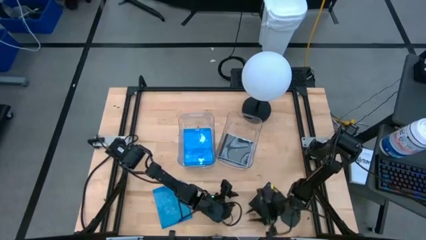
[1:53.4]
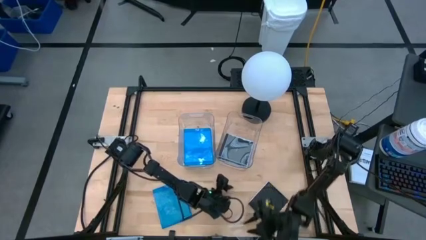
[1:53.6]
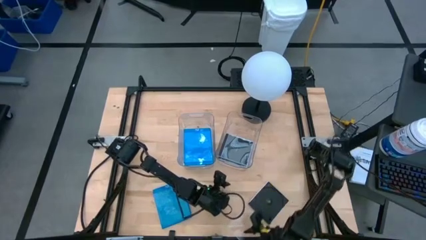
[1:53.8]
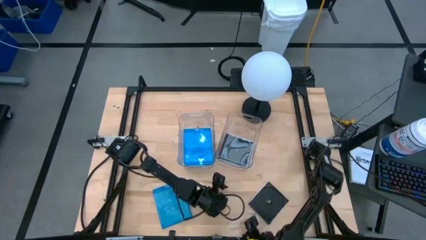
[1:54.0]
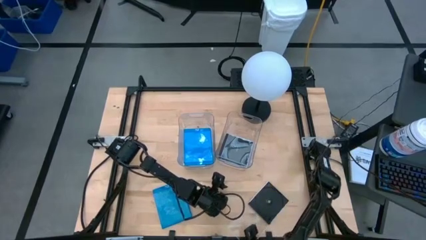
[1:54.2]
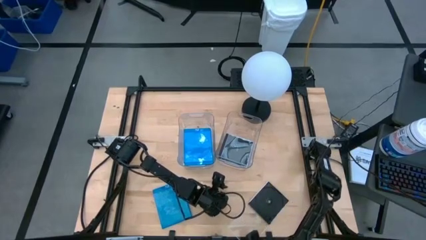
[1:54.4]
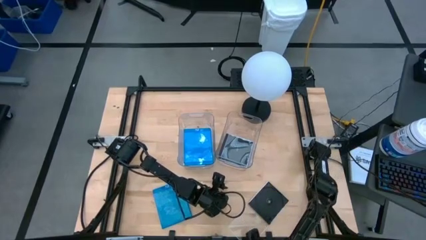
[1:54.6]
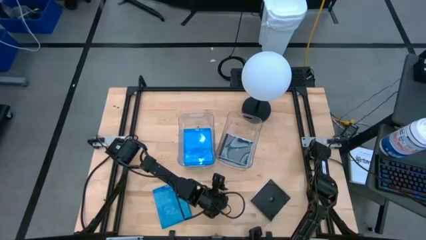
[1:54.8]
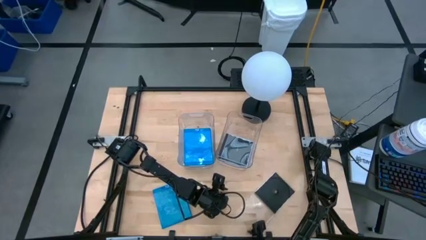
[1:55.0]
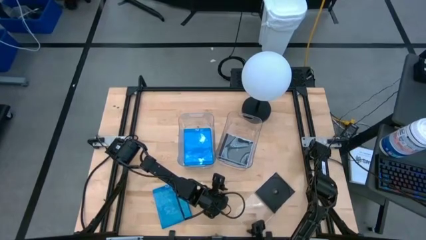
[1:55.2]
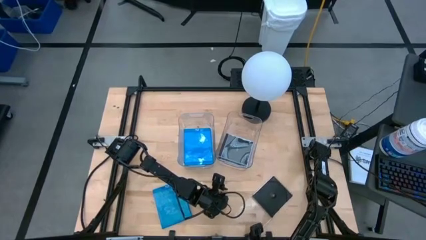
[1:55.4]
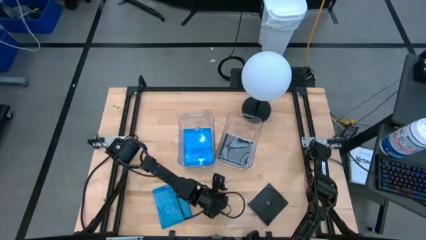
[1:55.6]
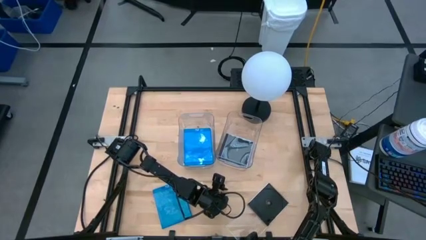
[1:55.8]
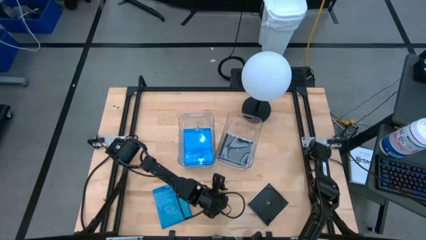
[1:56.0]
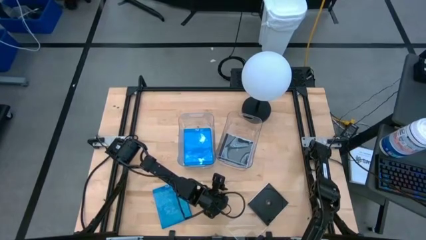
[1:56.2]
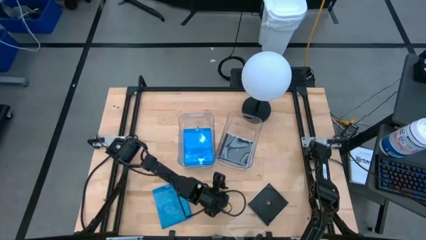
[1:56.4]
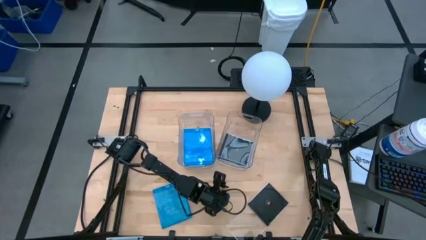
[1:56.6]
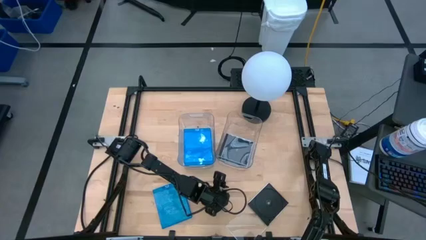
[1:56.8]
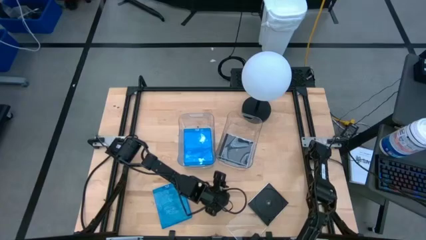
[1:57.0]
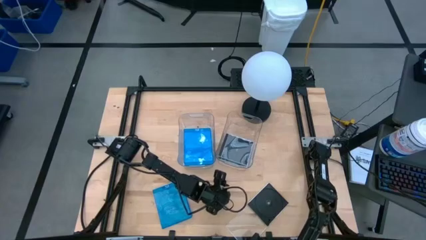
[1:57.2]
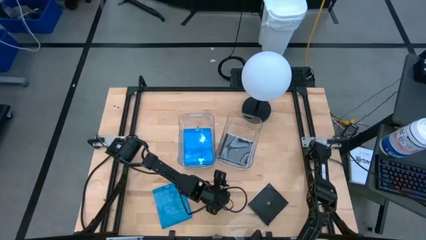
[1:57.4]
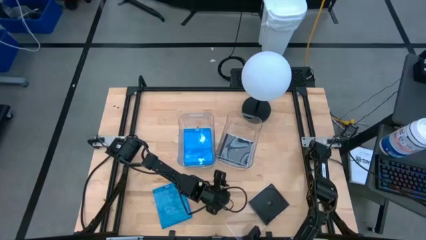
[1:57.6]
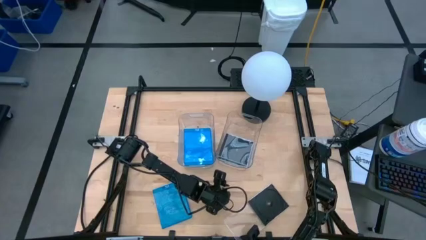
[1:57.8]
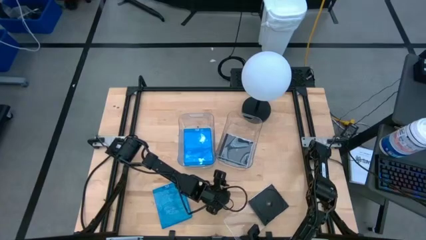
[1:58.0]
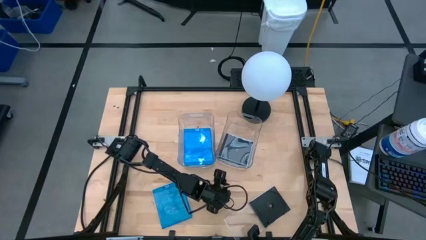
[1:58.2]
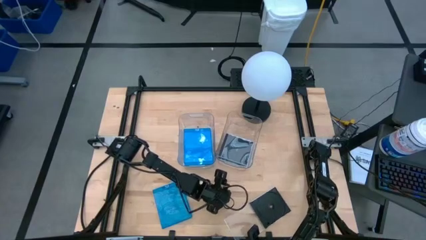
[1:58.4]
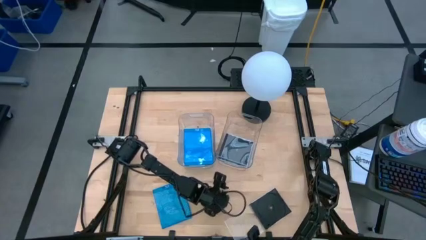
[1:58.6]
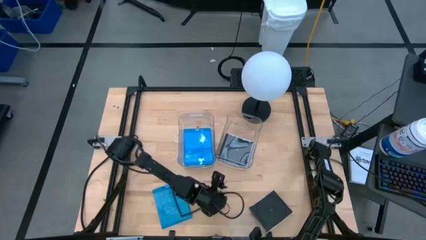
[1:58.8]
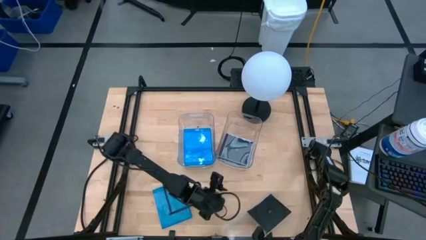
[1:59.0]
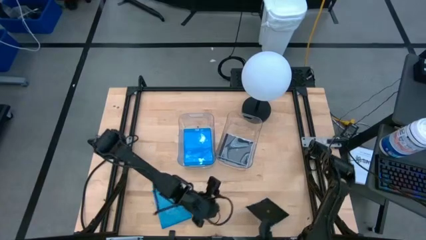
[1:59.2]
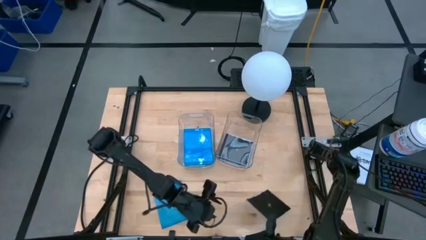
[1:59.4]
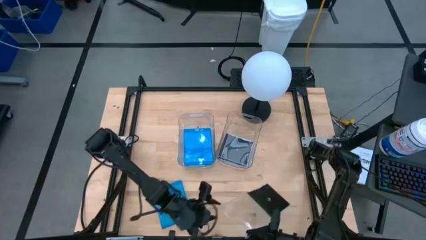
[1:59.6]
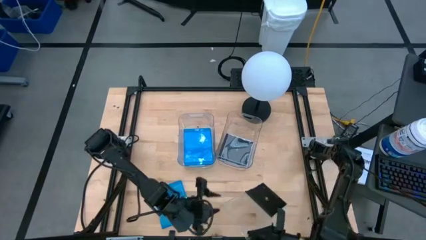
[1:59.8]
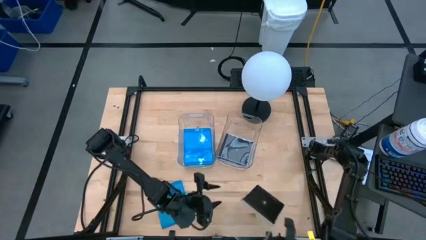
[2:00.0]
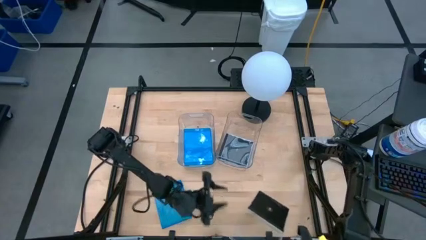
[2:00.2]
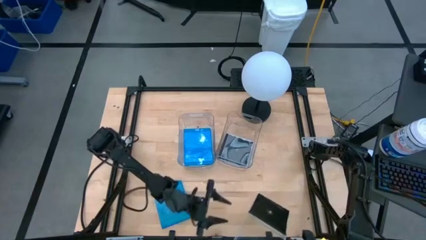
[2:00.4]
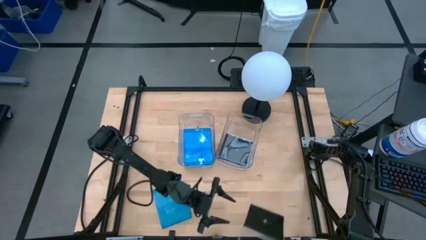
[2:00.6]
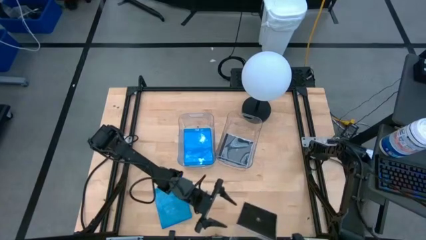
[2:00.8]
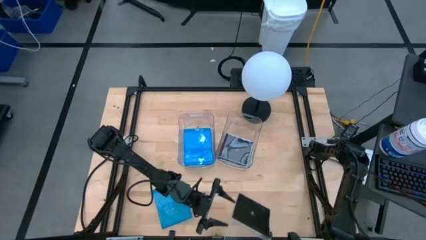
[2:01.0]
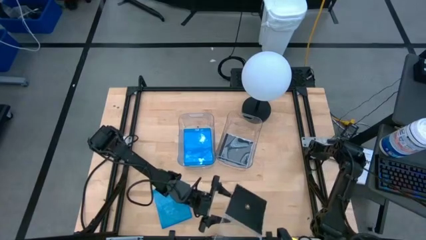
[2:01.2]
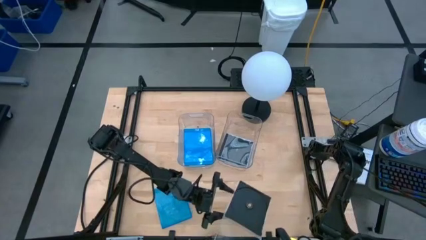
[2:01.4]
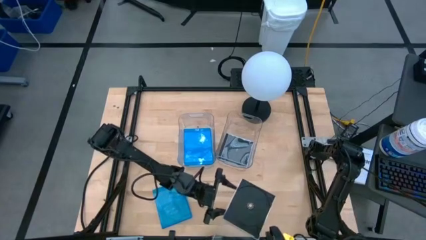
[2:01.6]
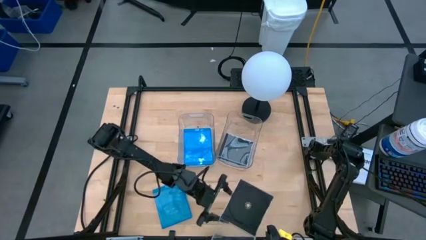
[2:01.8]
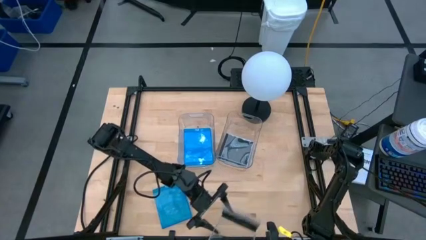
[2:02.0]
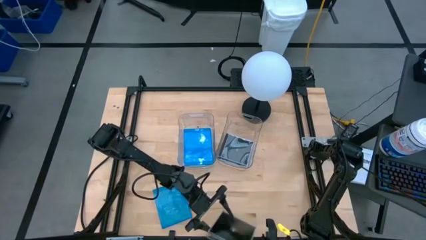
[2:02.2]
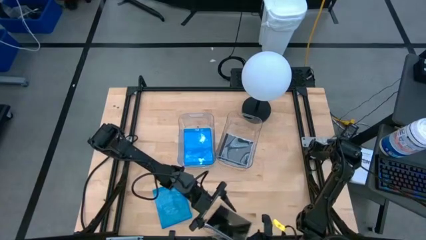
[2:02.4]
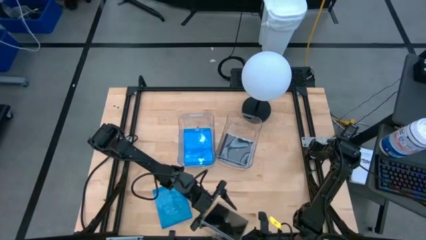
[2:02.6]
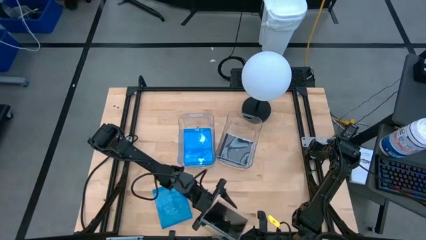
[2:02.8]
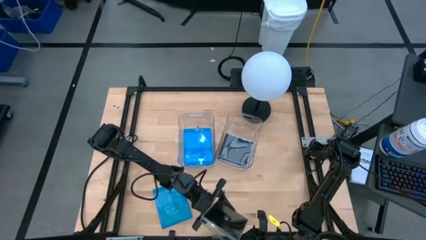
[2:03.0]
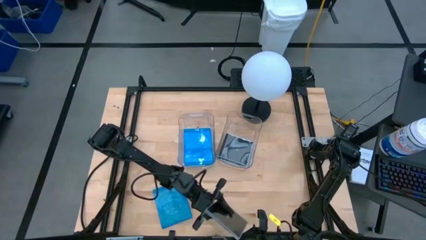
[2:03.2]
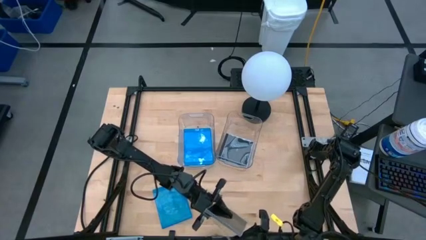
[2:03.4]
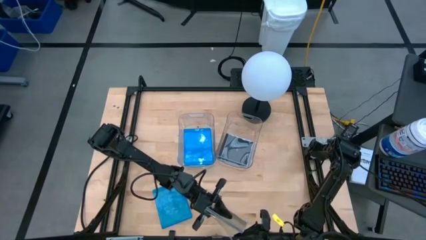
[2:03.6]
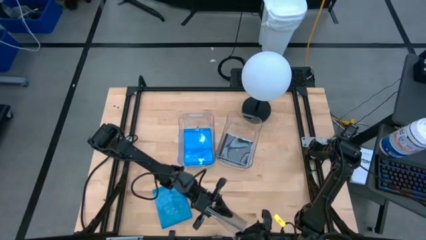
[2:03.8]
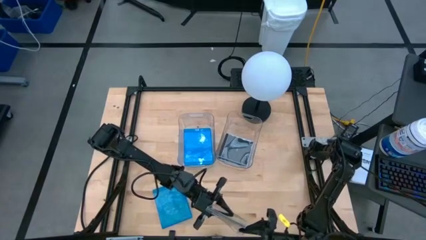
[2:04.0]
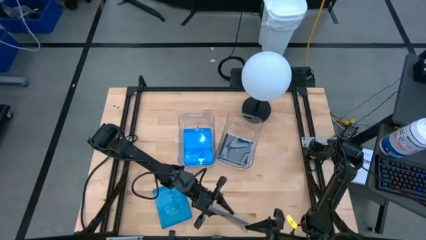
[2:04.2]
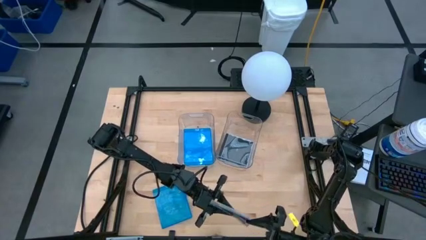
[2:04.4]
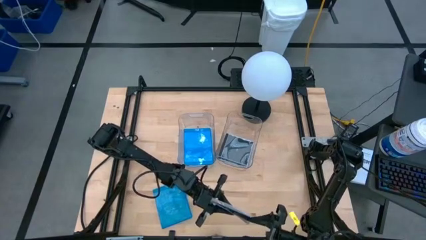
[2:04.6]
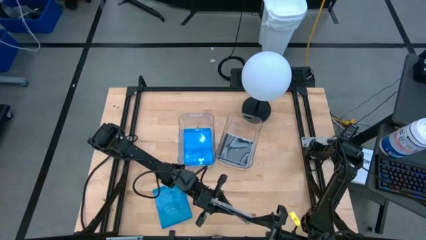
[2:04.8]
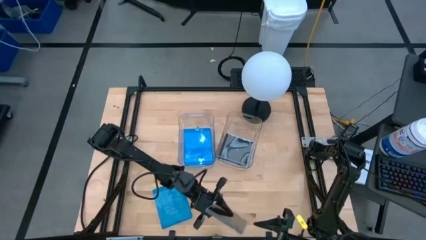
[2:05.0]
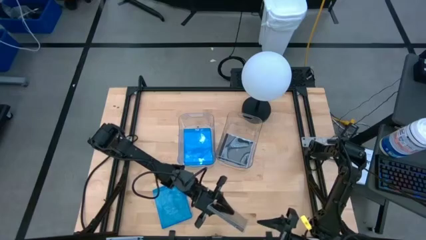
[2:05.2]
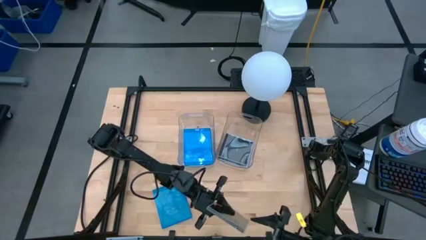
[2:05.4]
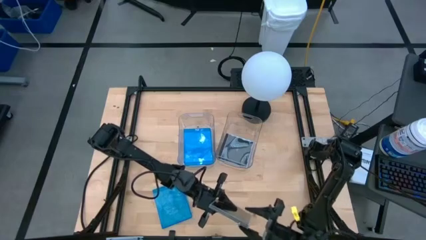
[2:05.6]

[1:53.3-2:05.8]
Task: Pick & place jewel cases by type
Put the black cd case into the right transparent bin

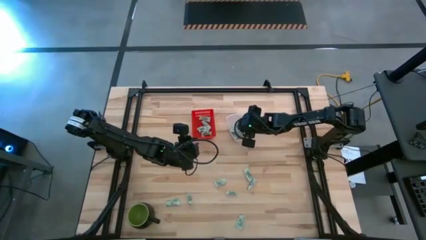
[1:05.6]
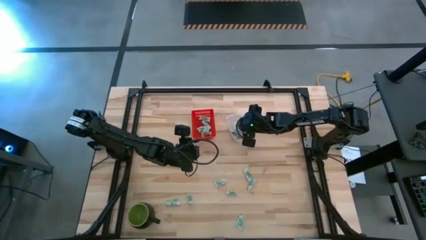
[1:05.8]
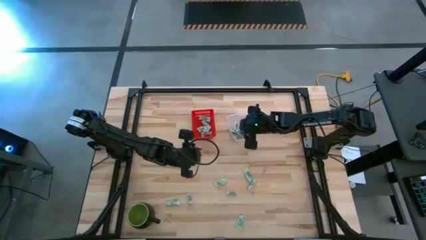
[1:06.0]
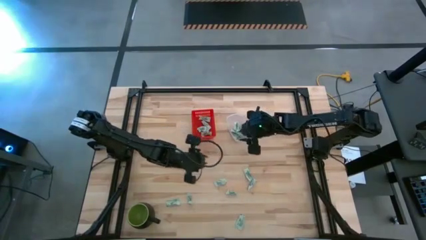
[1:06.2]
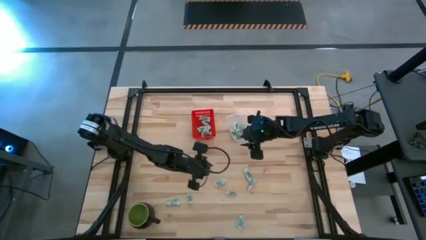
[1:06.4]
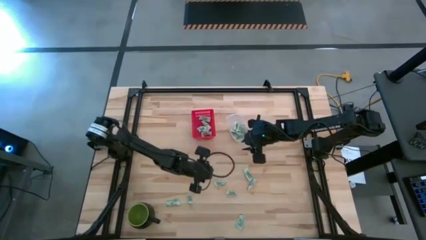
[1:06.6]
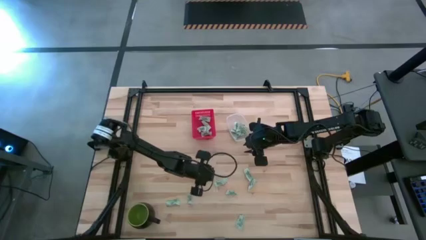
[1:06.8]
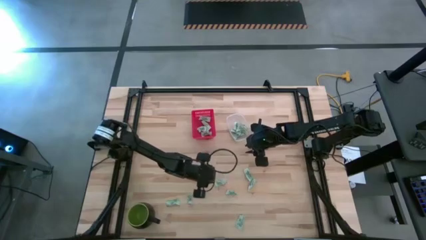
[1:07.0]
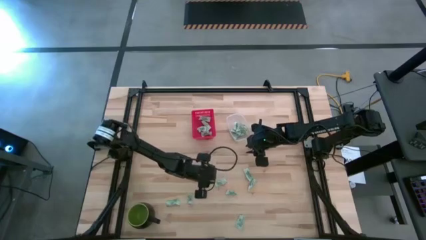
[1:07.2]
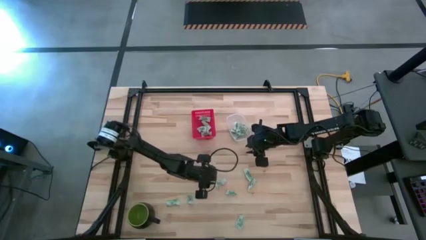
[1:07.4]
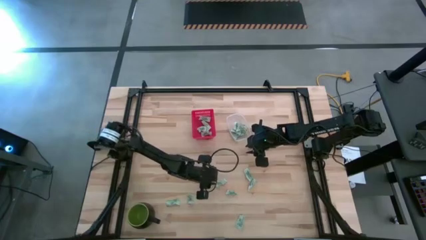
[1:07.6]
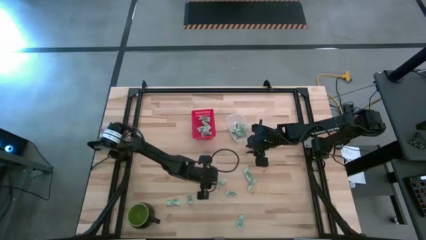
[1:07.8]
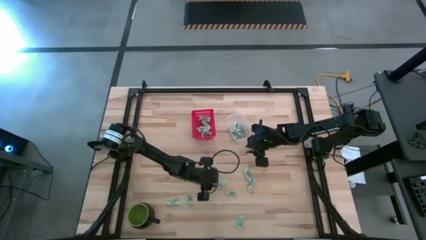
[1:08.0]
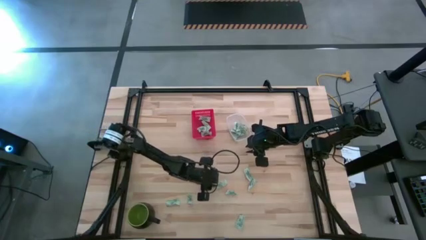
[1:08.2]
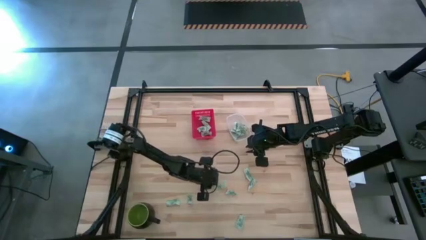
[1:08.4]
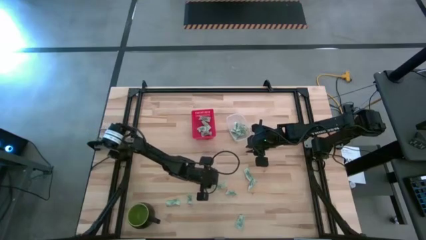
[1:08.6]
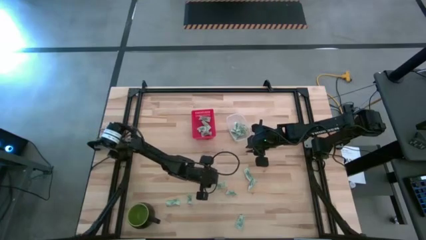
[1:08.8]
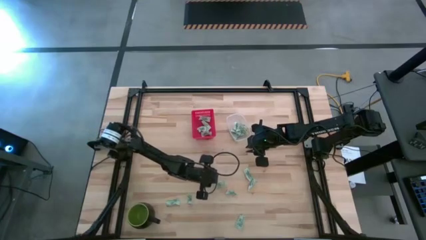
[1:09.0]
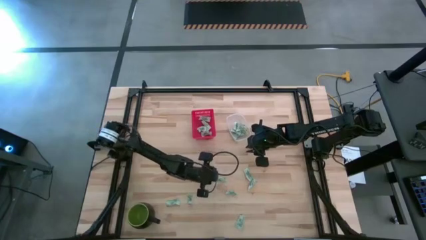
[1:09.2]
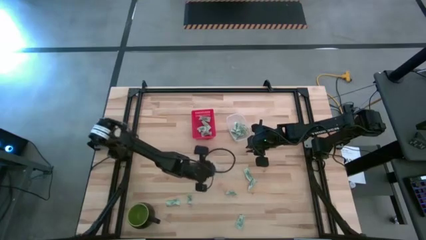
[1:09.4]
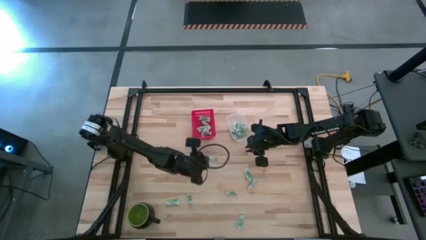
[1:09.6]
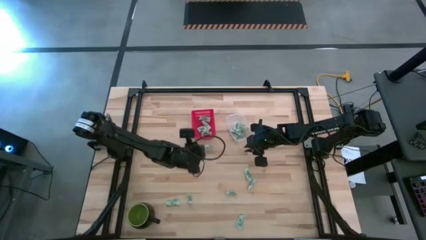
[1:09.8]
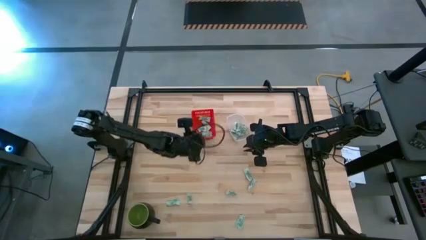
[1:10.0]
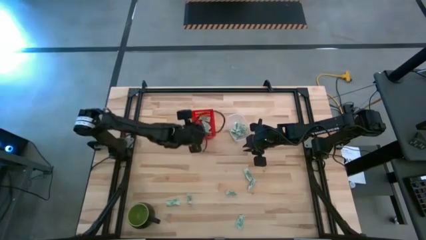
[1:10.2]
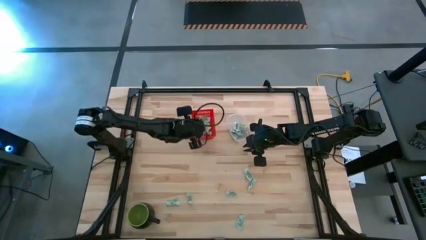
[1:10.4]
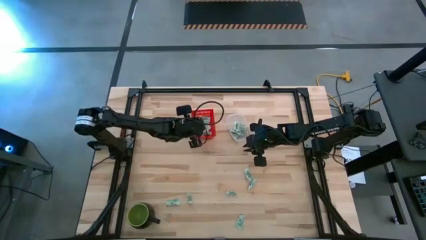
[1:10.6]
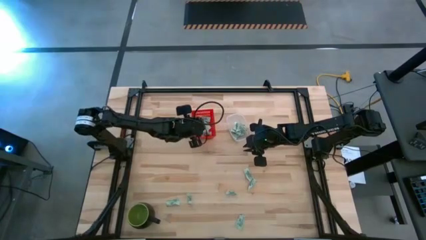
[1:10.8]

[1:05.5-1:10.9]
Task: Pick and place items into bin
Put the white stevia packet into the red bin
